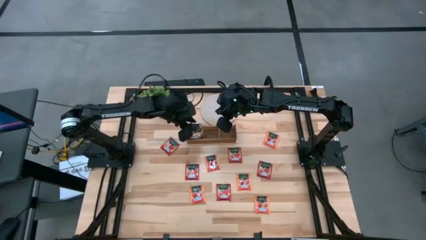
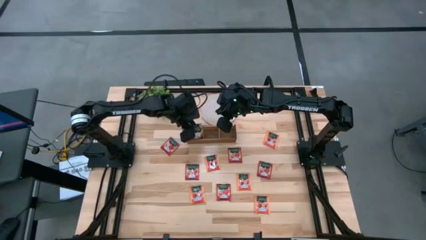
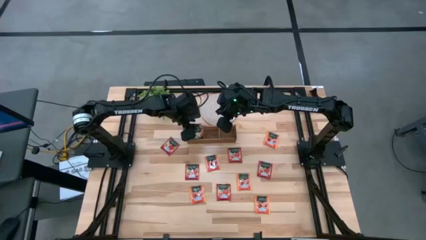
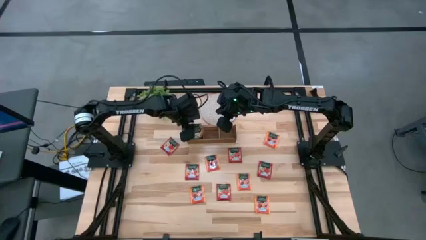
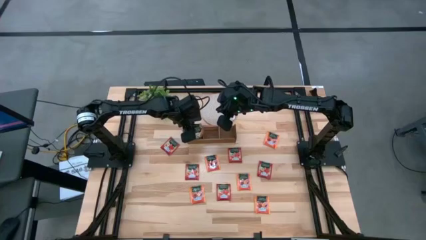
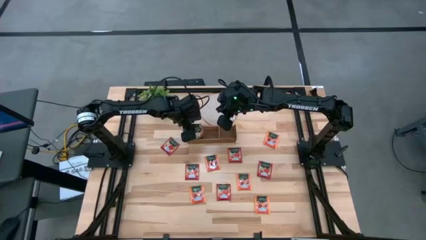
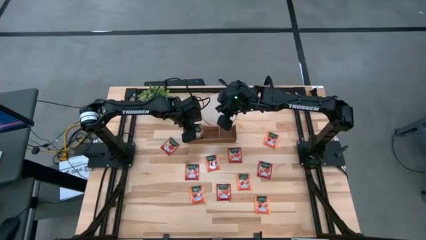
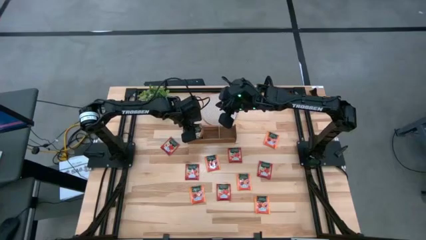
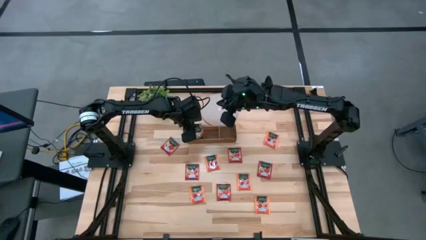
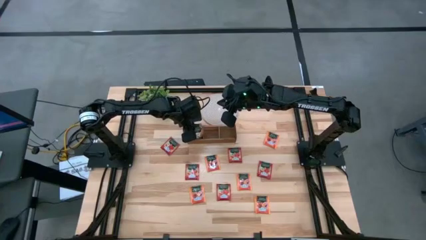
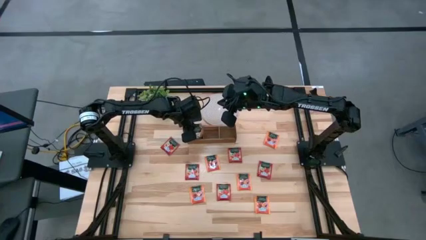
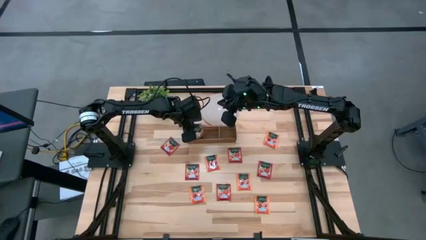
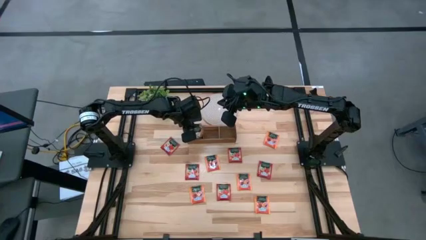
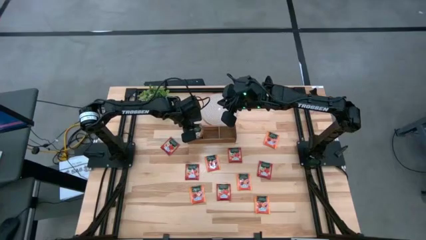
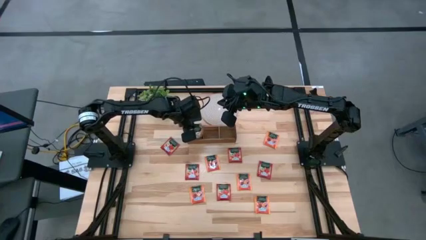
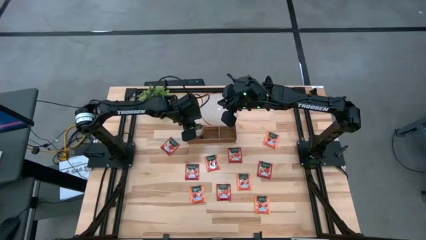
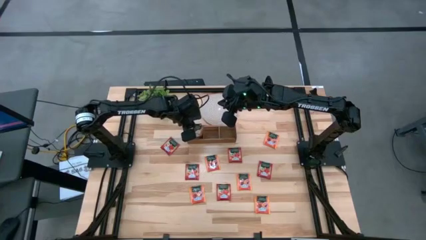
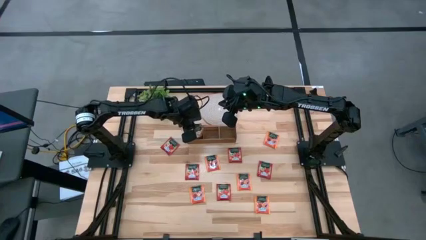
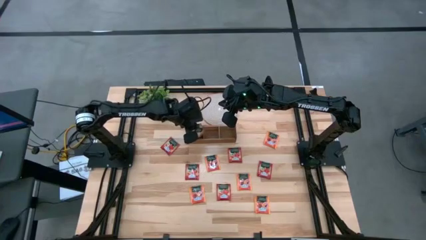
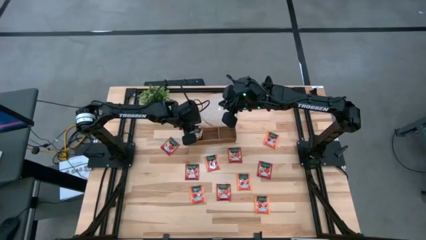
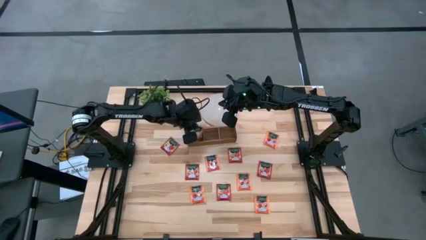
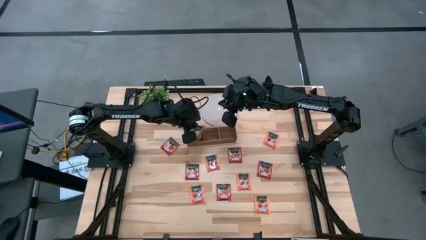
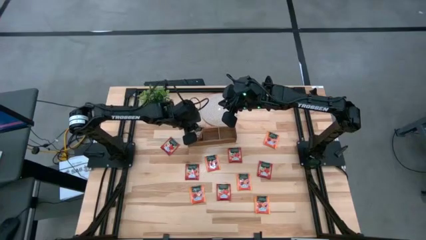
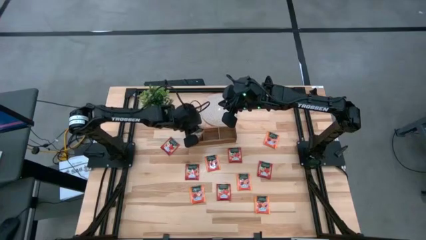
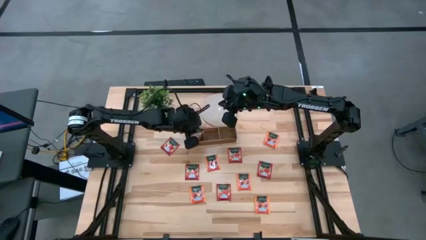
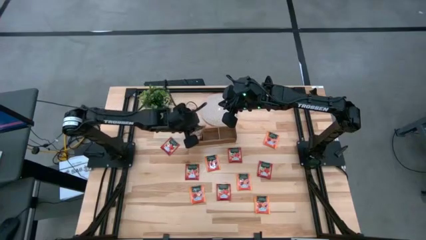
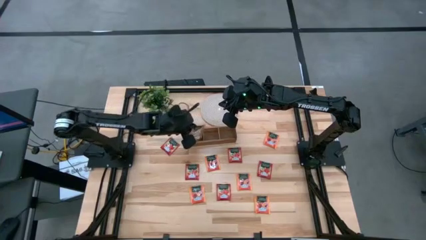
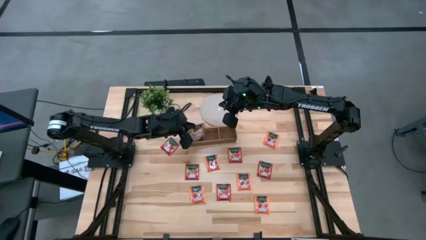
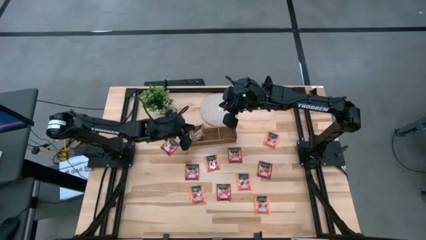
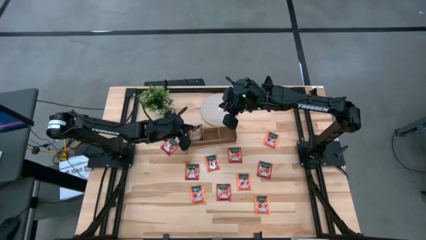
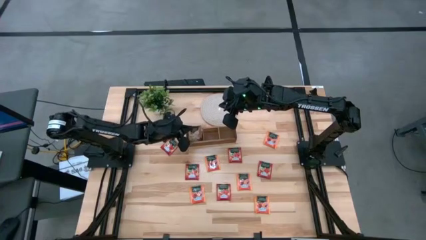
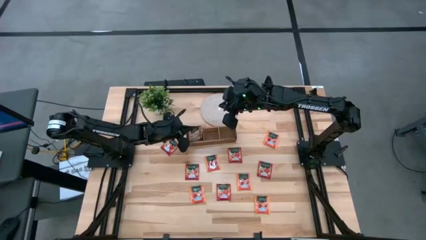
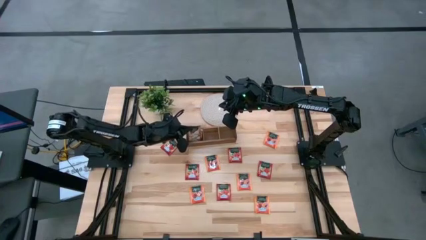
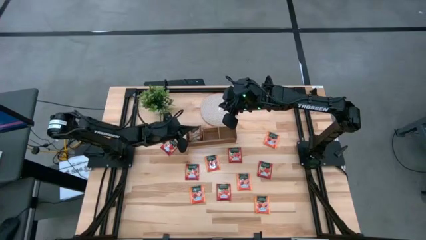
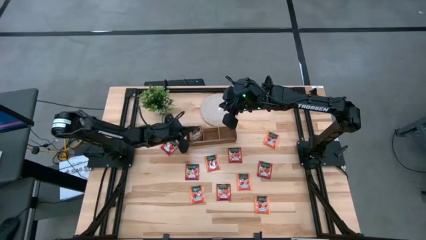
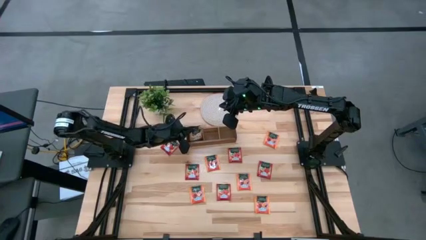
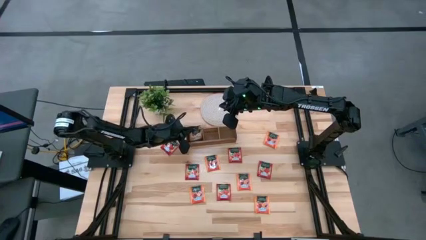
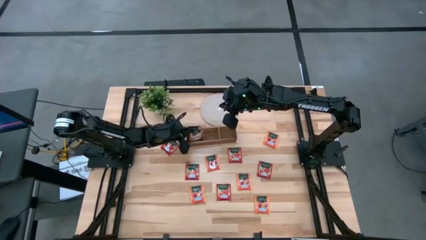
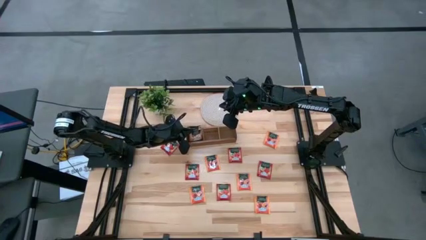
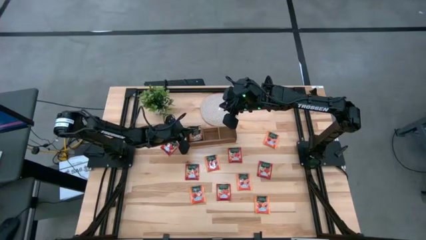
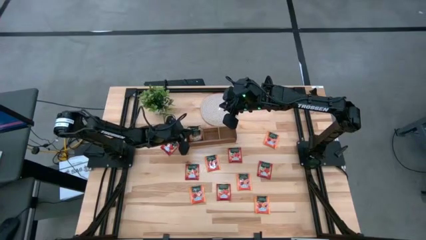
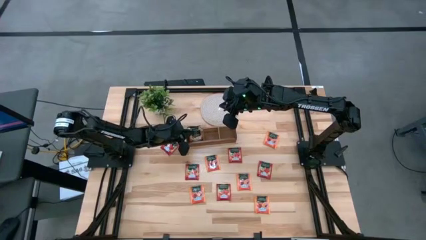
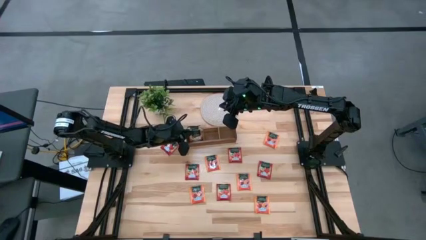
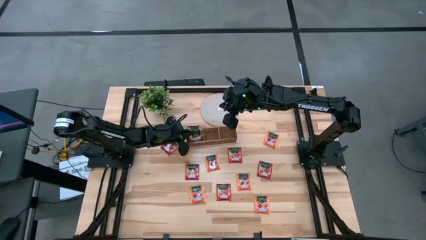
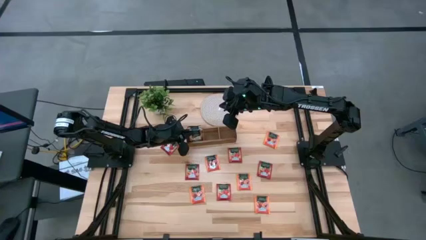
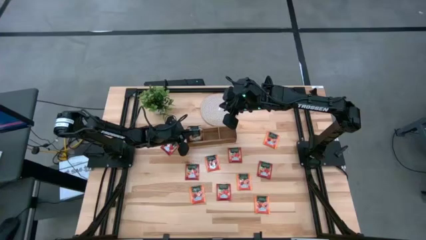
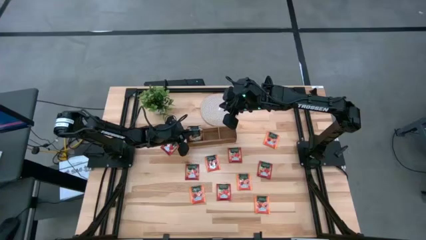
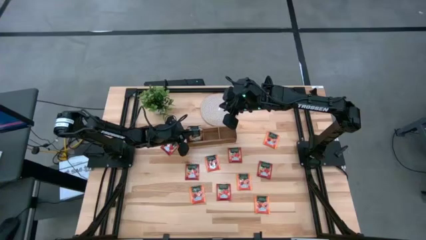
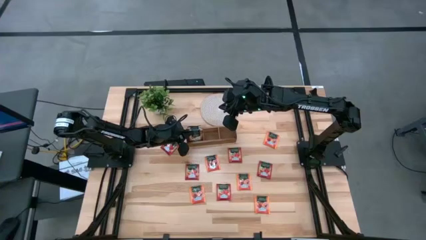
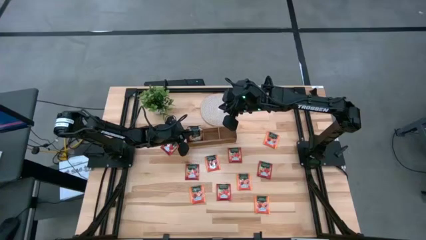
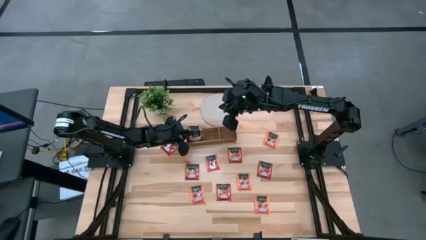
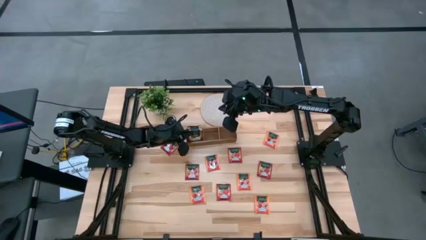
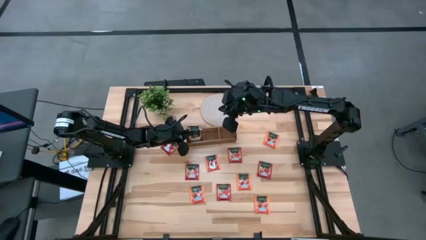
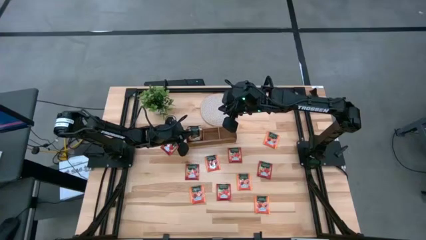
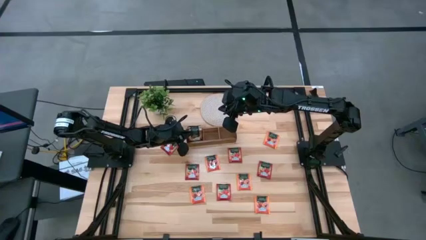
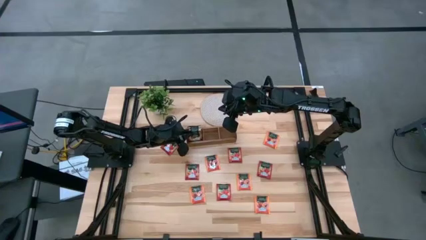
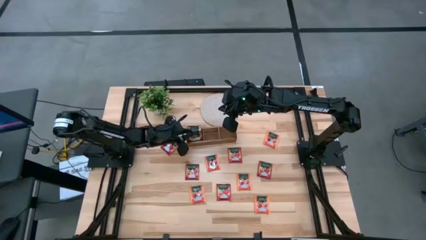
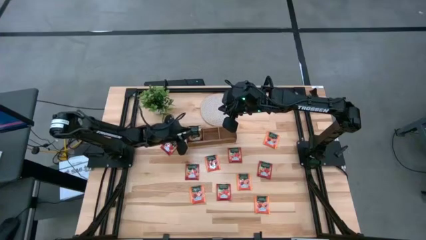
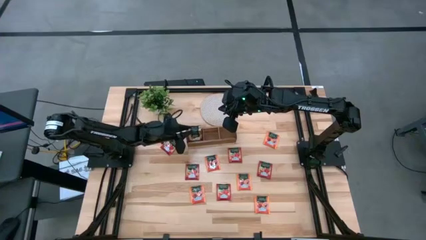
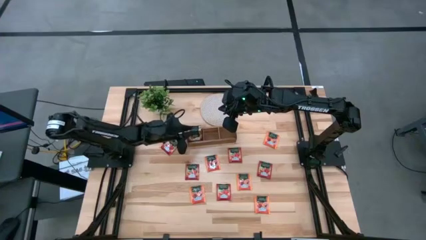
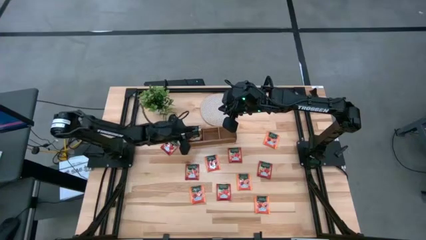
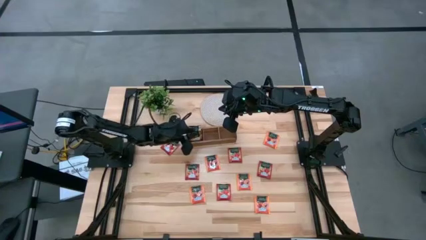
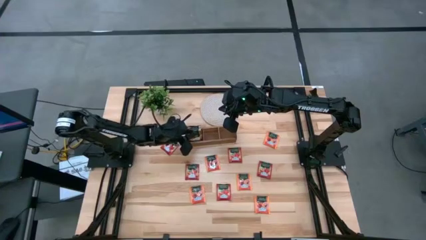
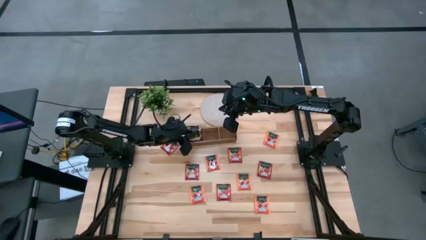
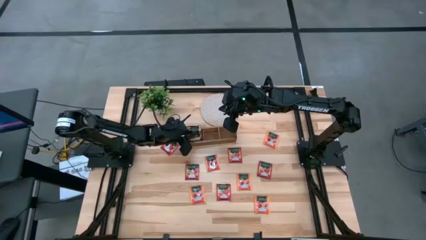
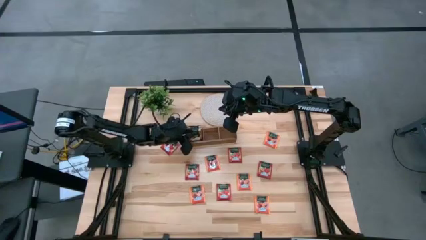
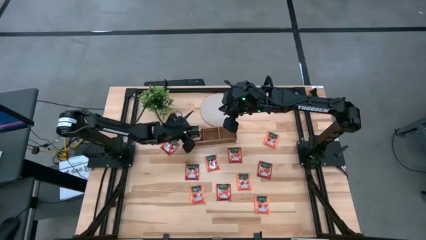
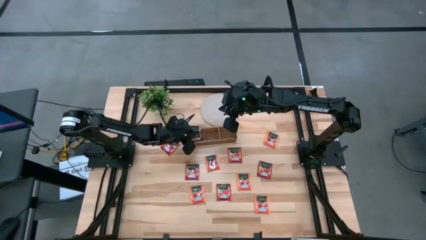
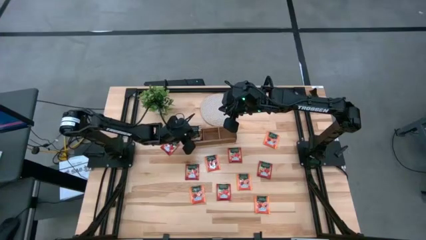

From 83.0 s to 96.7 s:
Task: Pick & Place Tea
Put the brown tea bag into the left of the wooden organizer
